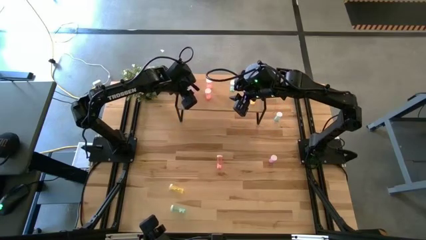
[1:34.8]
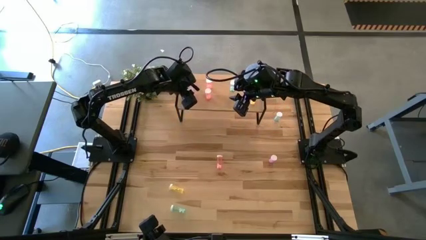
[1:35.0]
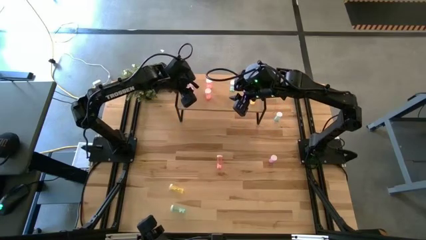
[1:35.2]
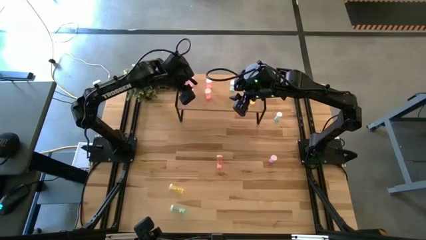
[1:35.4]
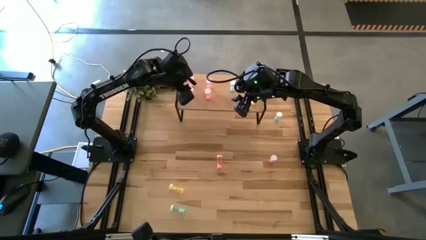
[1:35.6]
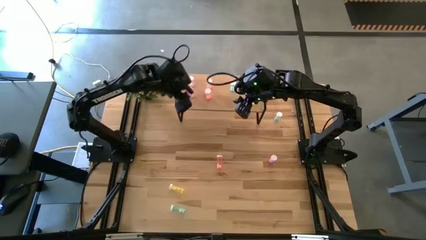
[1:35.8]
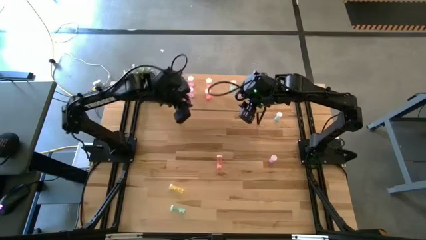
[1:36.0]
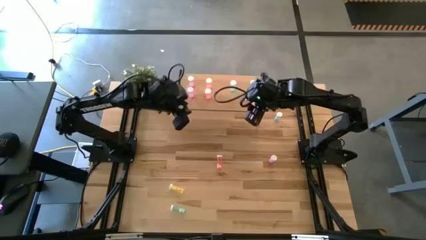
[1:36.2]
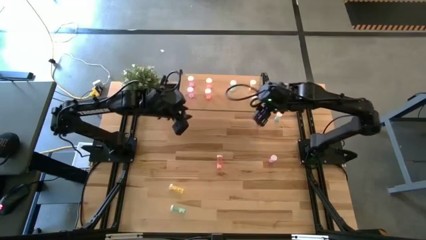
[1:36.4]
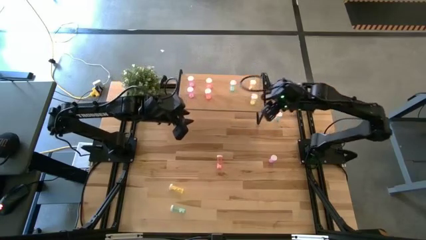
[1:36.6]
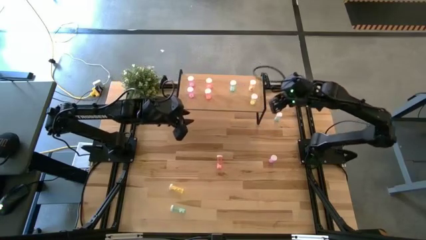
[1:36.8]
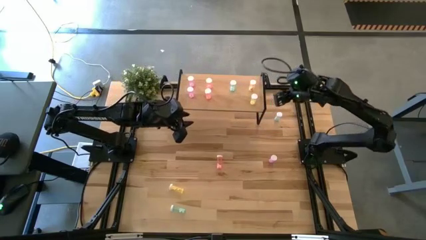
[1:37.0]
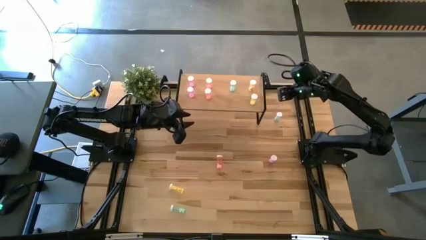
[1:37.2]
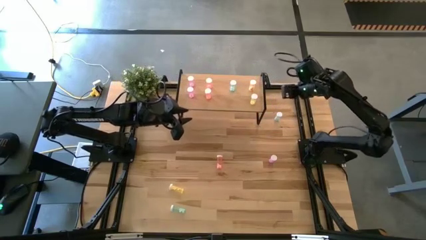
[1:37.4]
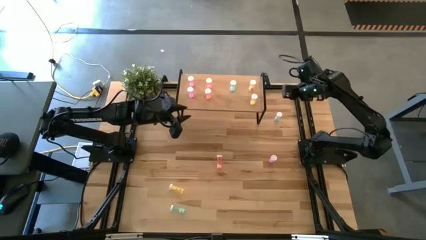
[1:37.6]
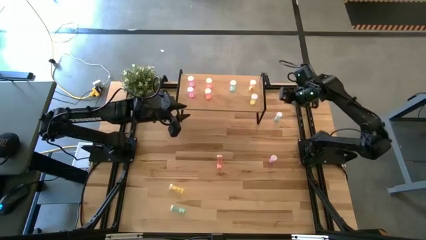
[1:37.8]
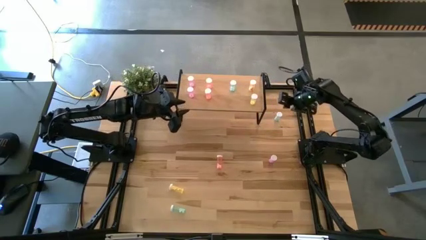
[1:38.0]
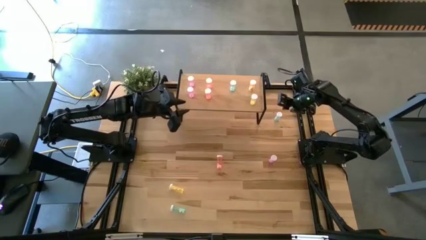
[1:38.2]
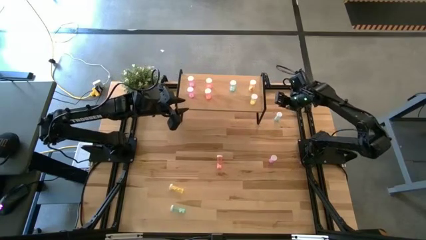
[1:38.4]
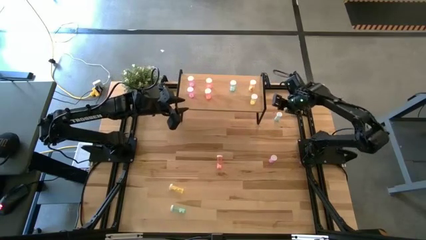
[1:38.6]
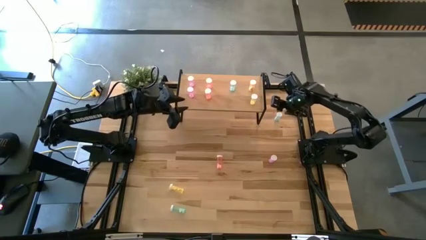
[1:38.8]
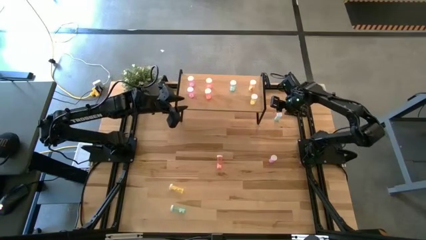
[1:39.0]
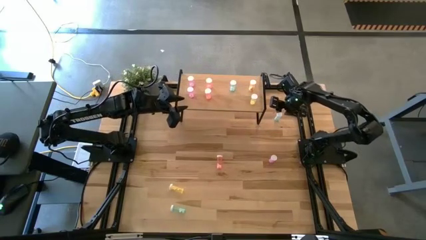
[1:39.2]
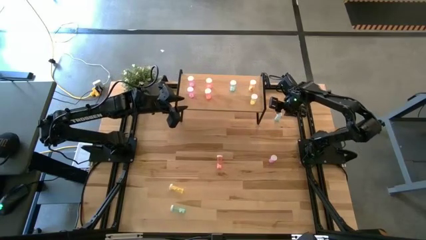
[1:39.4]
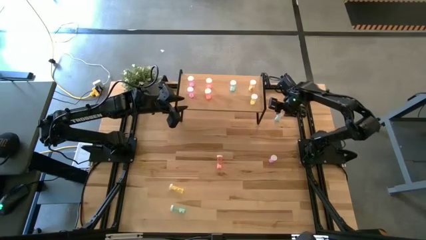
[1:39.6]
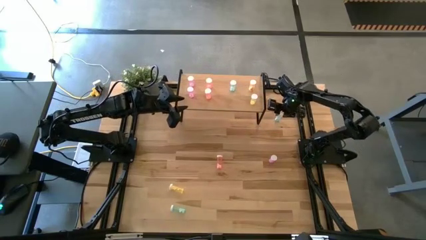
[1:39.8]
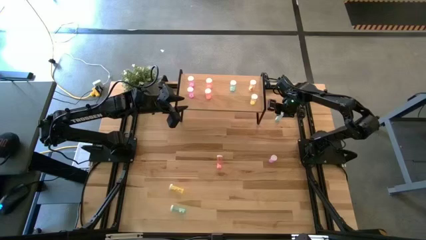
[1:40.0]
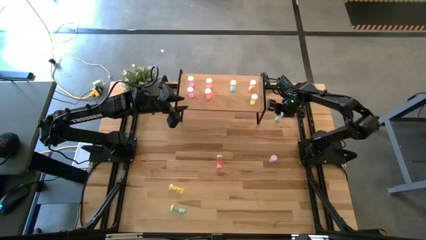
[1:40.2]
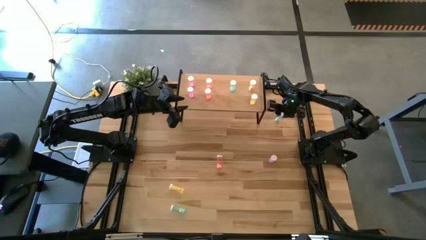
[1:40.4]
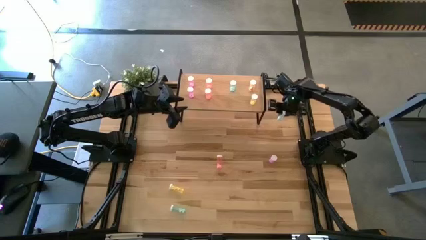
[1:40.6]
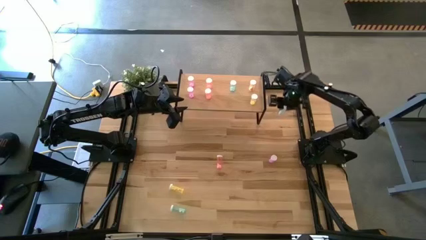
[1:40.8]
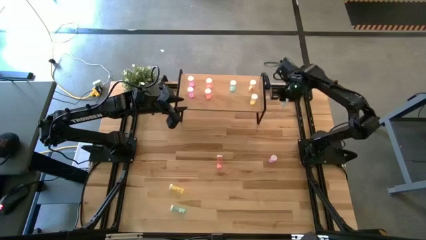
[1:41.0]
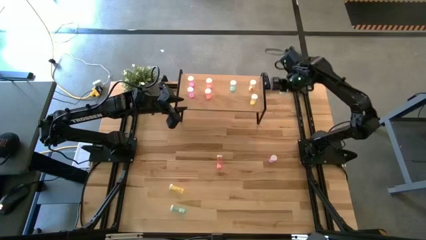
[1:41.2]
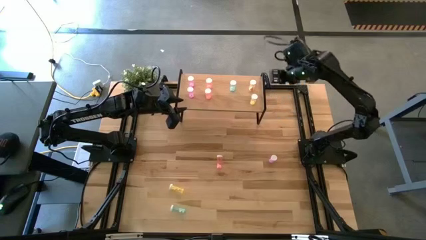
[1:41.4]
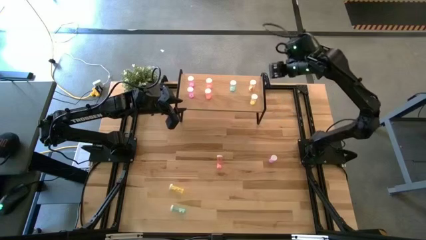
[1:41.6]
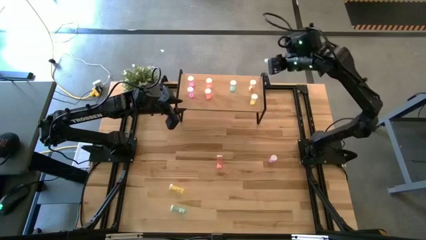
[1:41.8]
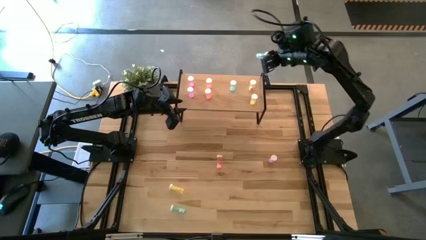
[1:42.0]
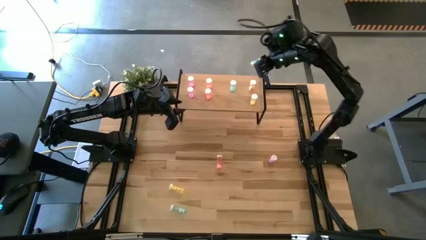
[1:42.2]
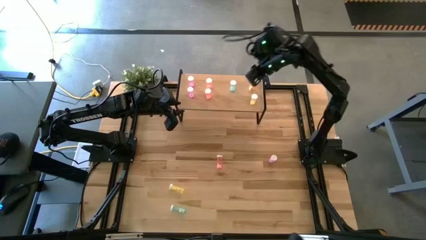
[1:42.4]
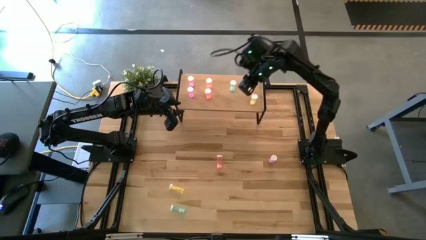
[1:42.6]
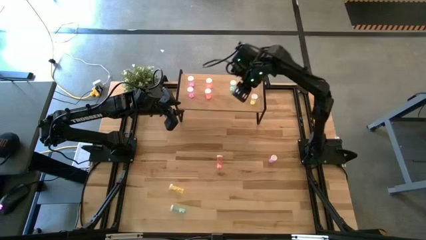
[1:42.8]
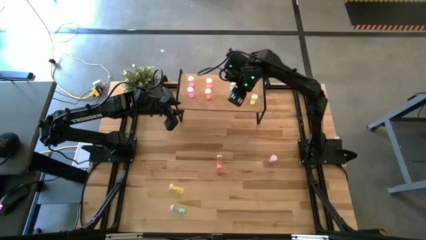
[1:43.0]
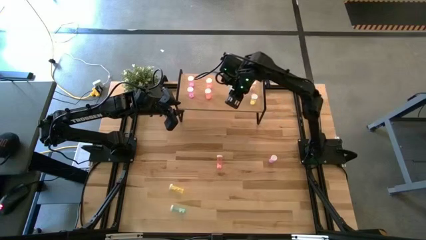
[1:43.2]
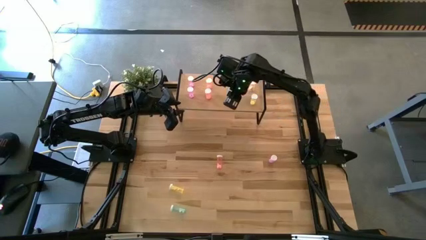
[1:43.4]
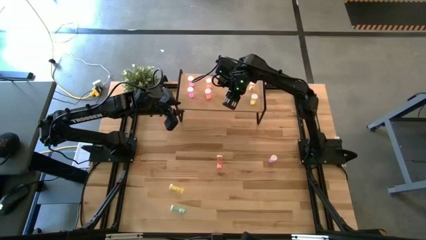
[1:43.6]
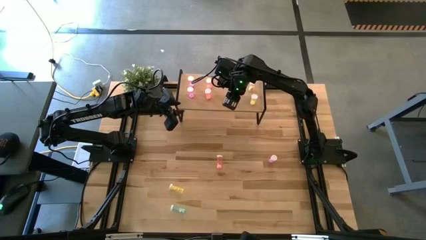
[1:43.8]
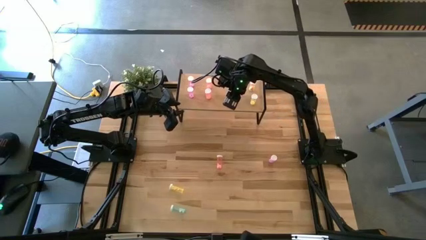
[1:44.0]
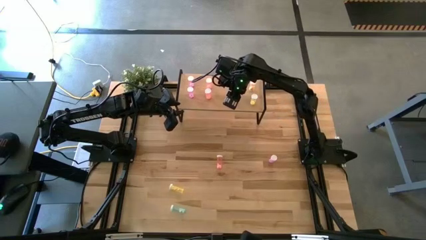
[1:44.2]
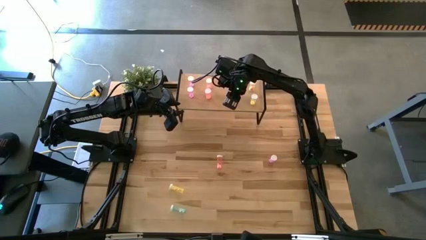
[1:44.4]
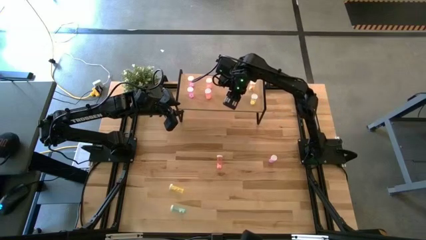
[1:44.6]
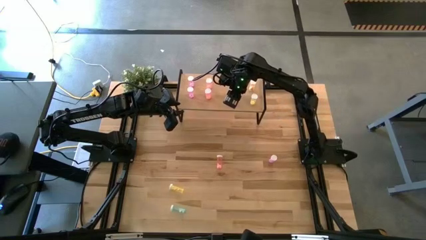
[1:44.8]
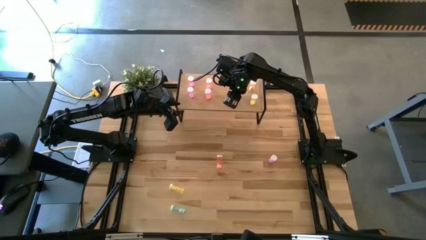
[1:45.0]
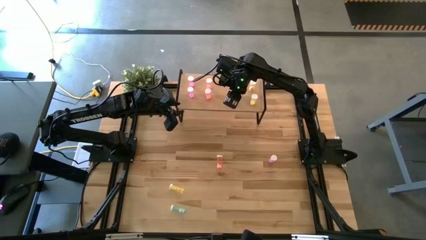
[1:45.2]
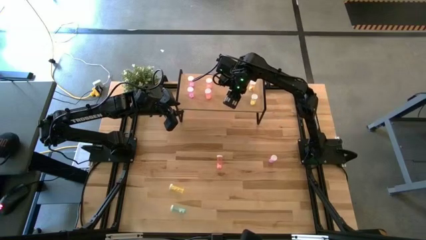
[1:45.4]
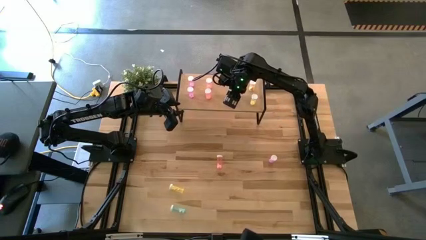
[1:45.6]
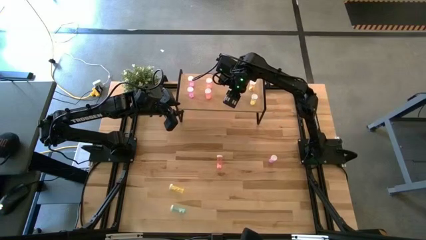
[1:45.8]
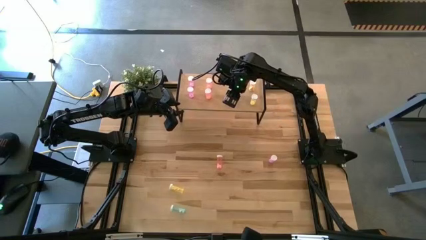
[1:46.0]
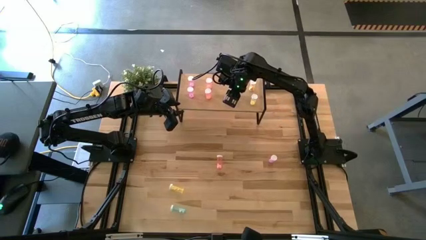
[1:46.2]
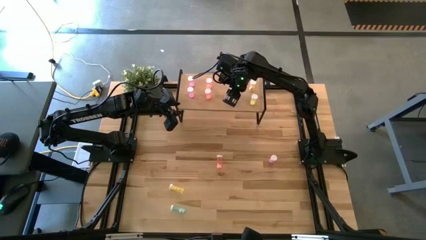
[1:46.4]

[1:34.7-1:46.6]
Task: Pick and place medicine bottles onto shelf by color
Put the top blue pill bottle on the shelf aligned with the other blue pill bottle

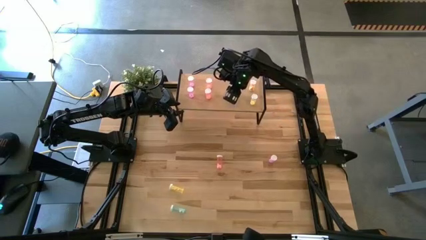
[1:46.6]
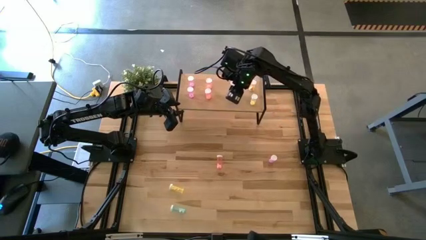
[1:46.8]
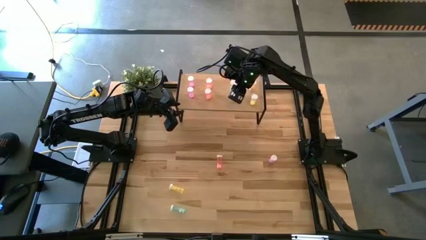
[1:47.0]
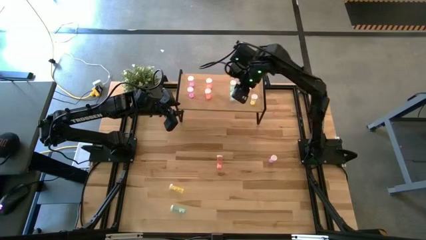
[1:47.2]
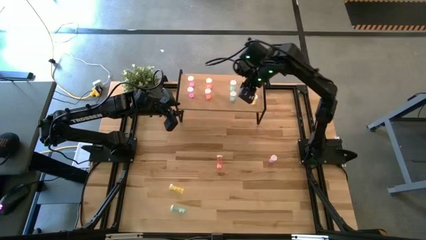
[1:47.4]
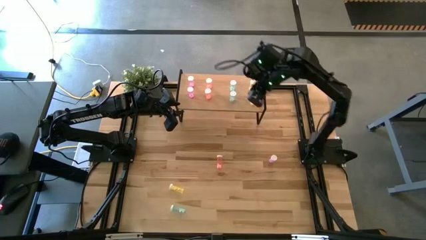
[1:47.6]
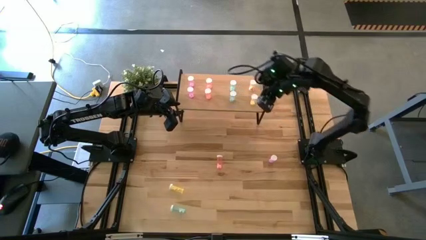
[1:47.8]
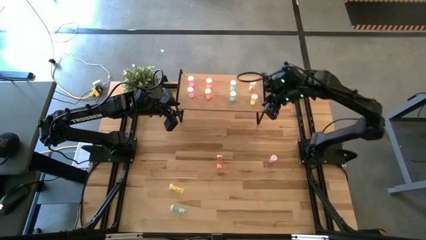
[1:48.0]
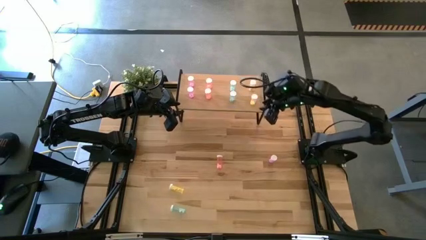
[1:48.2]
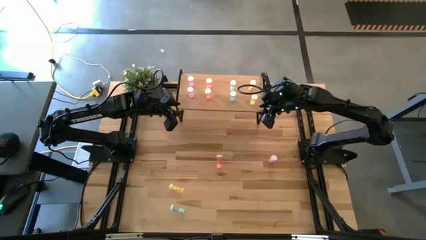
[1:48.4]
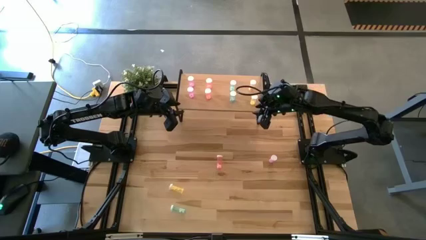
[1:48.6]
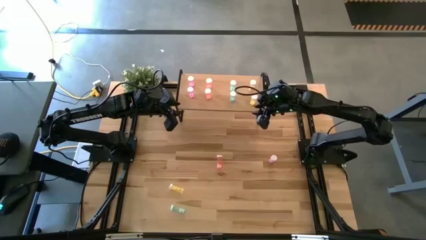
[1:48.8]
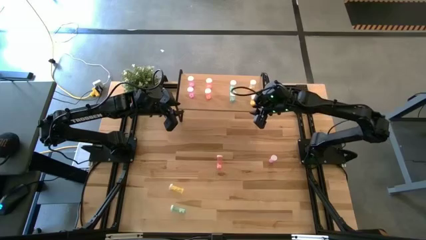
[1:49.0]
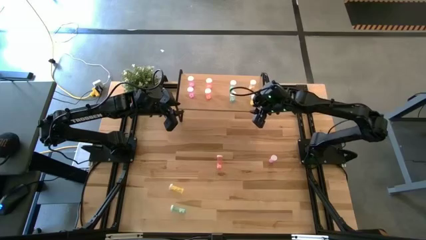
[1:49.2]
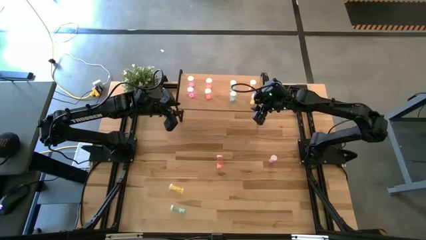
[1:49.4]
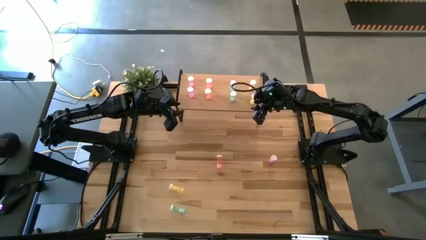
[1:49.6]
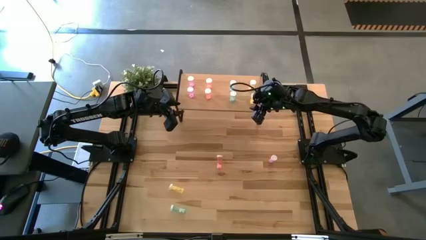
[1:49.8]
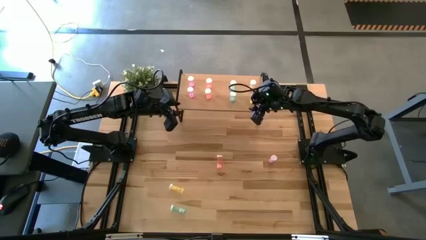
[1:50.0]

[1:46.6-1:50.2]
Adjust the yellow pill bottle on the shelf
